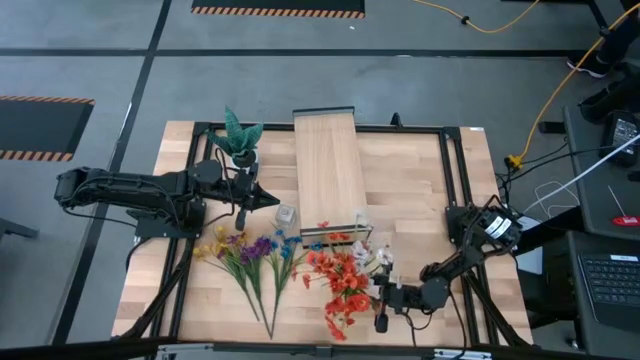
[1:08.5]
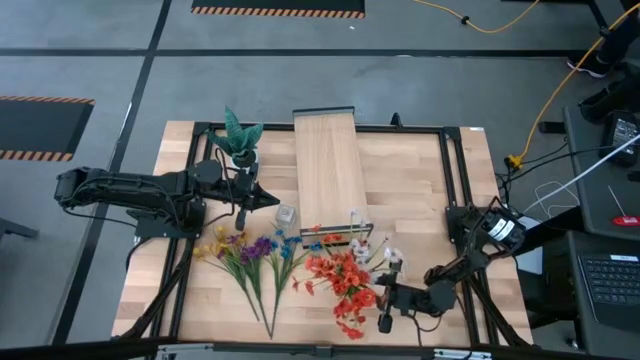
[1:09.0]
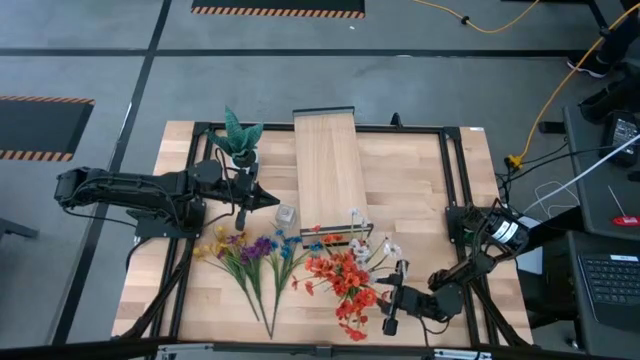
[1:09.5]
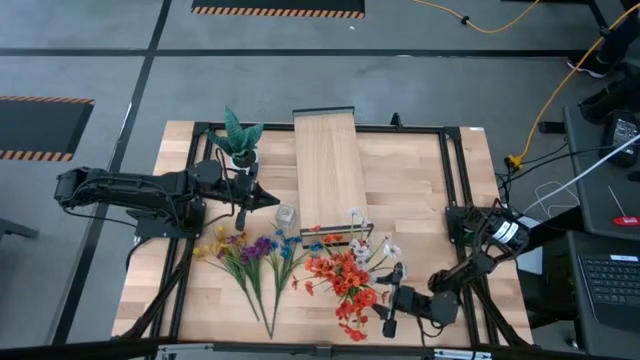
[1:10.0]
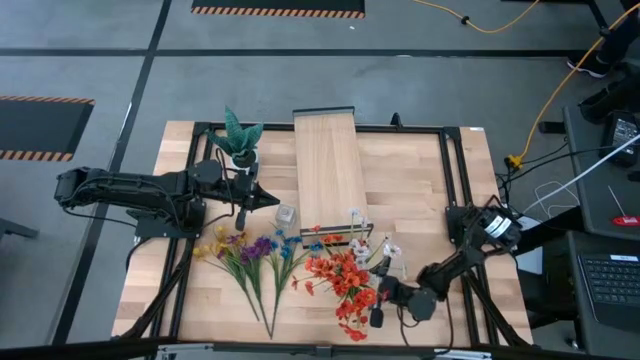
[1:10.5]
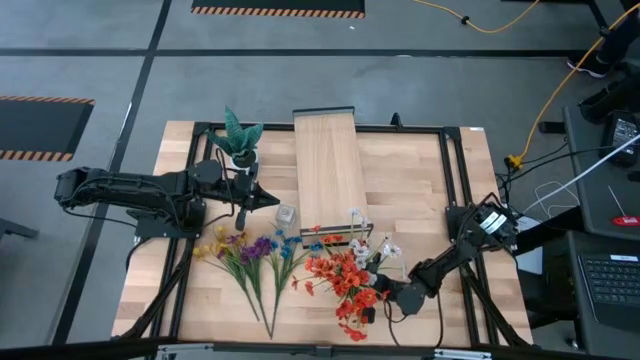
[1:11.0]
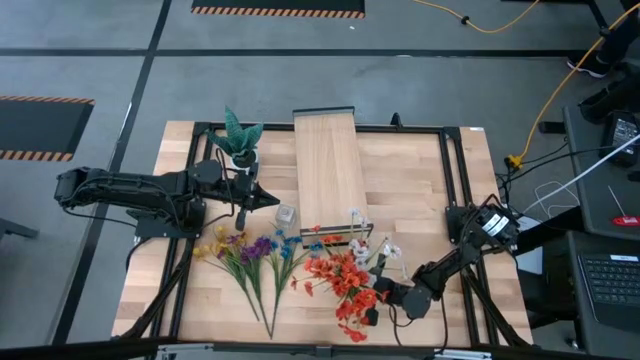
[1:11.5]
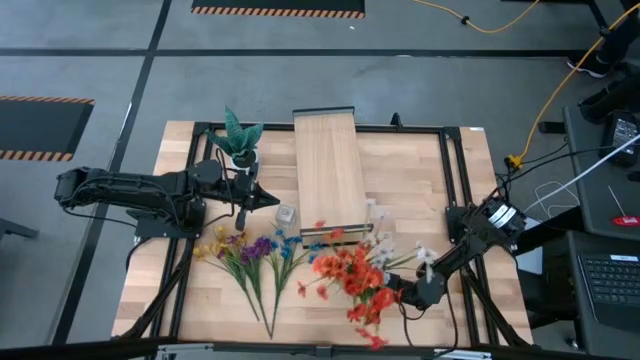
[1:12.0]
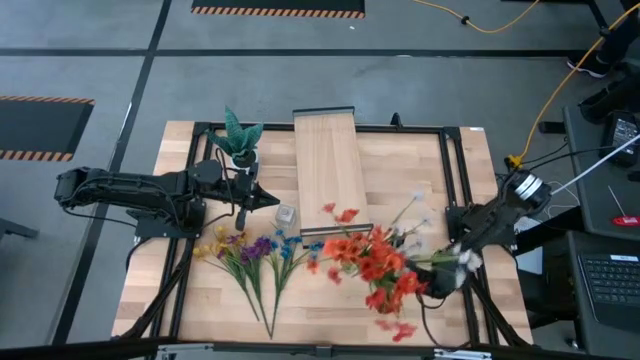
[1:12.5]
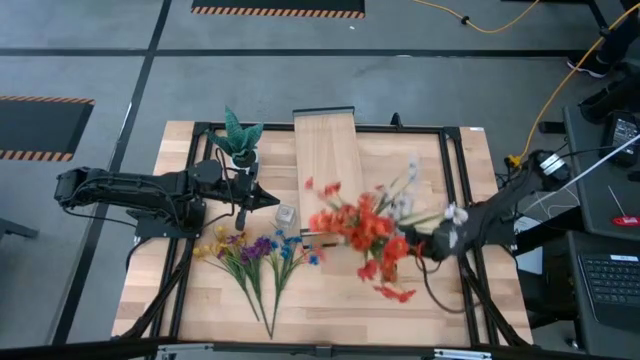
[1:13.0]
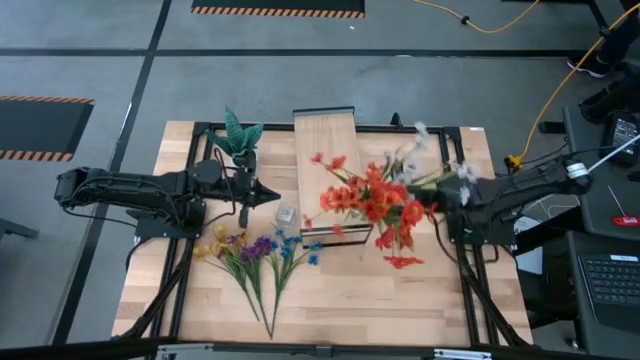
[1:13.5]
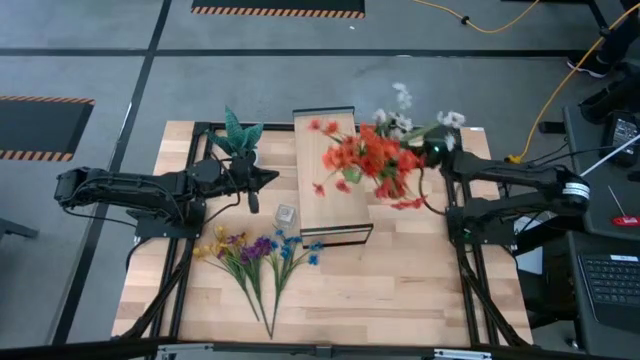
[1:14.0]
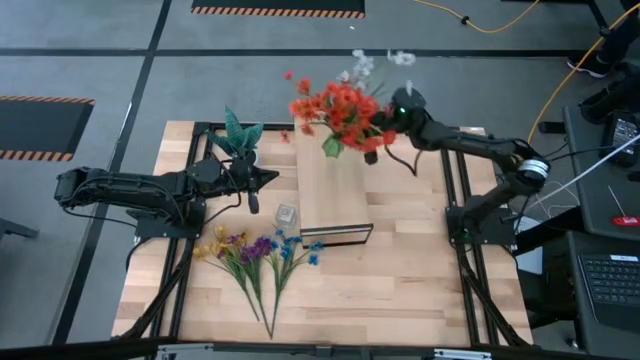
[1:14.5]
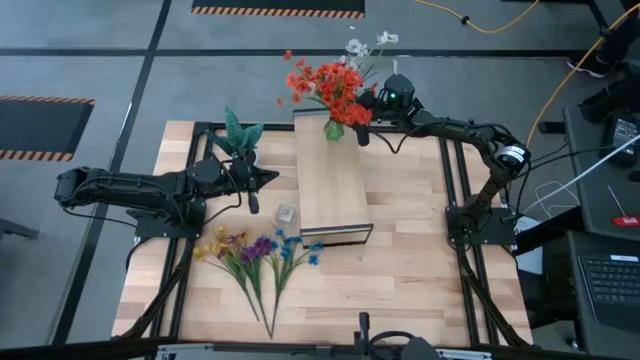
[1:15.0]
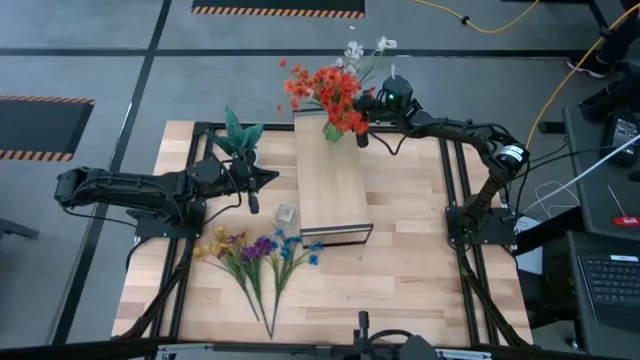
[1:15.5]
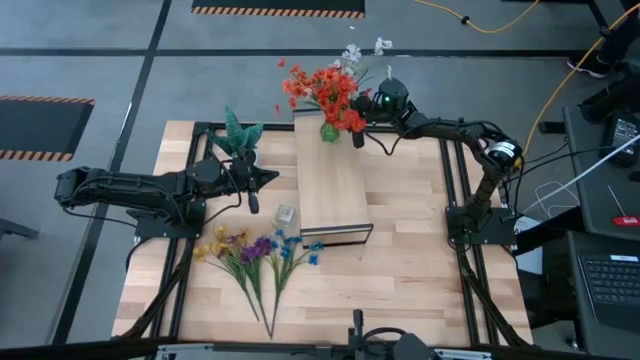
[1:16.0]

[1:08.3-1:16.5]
Task: Pick and place flowers into a vace then onto a shelf
Put the green vase with flowers on the shelf

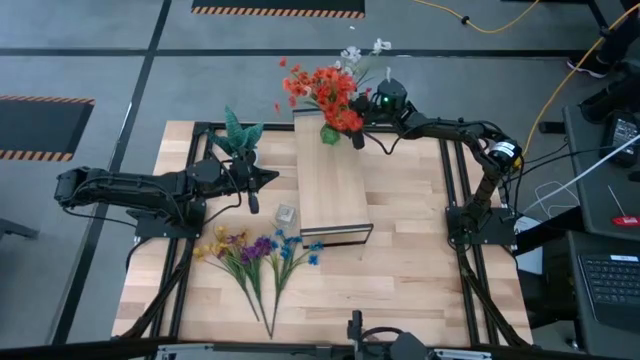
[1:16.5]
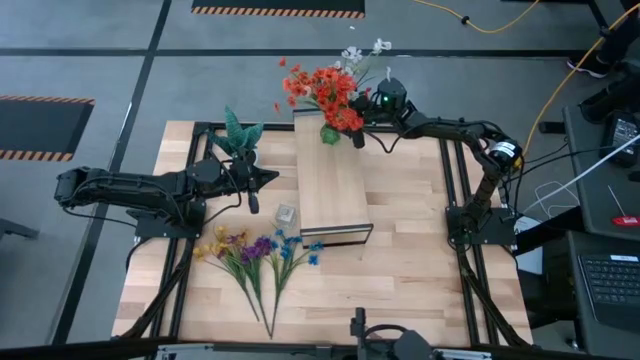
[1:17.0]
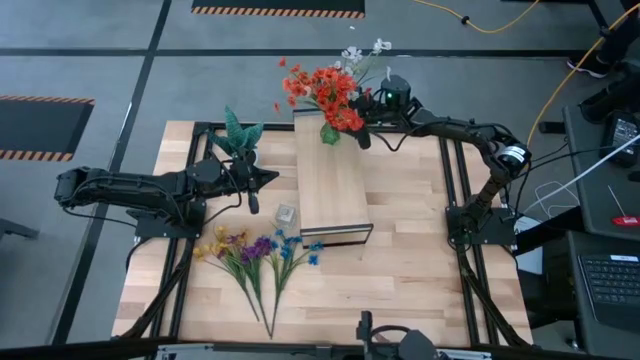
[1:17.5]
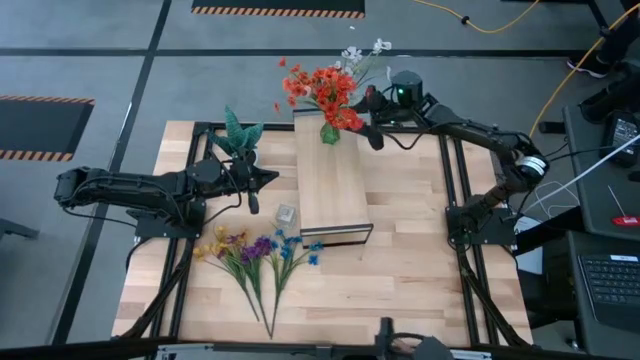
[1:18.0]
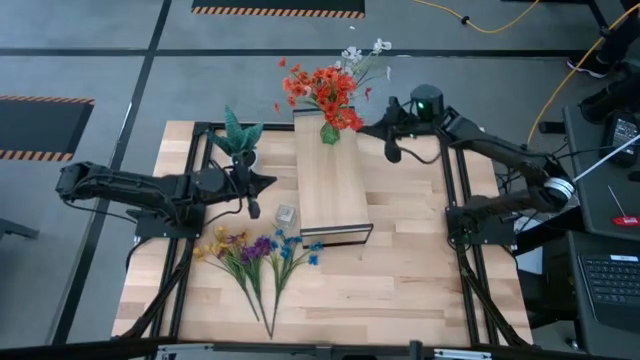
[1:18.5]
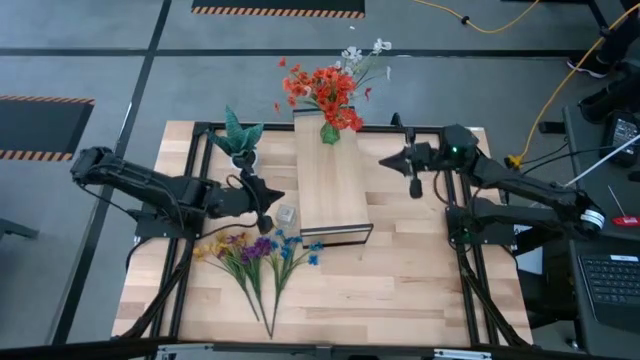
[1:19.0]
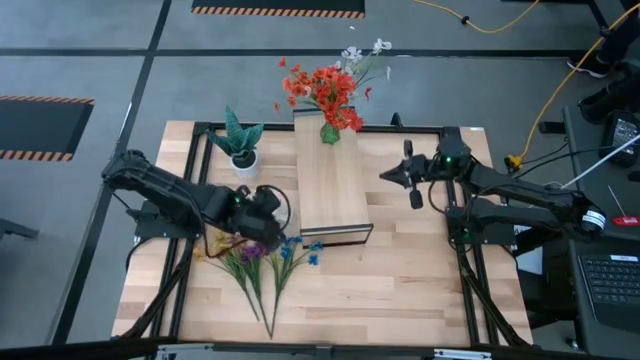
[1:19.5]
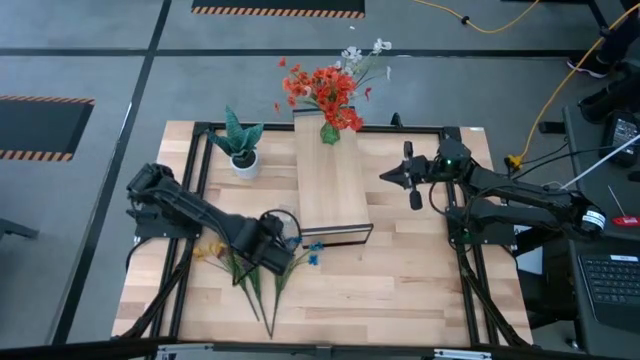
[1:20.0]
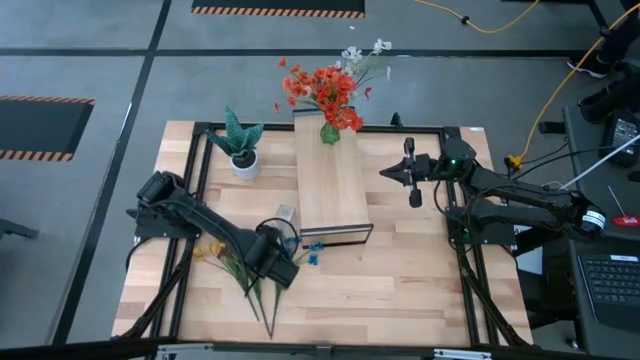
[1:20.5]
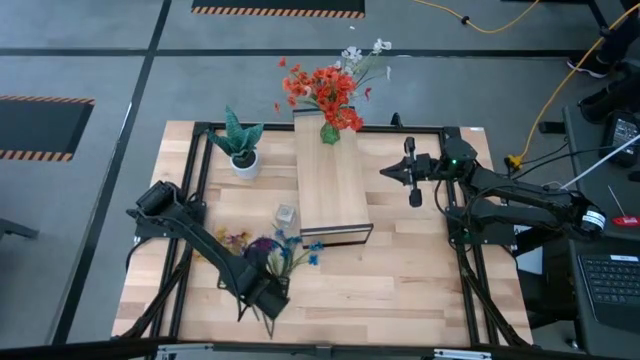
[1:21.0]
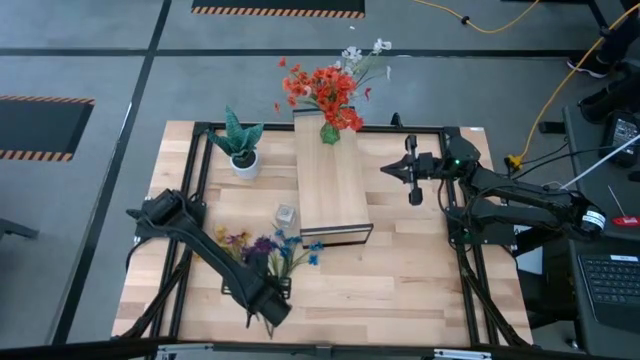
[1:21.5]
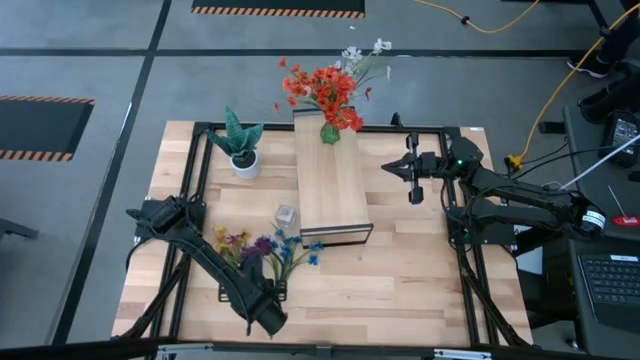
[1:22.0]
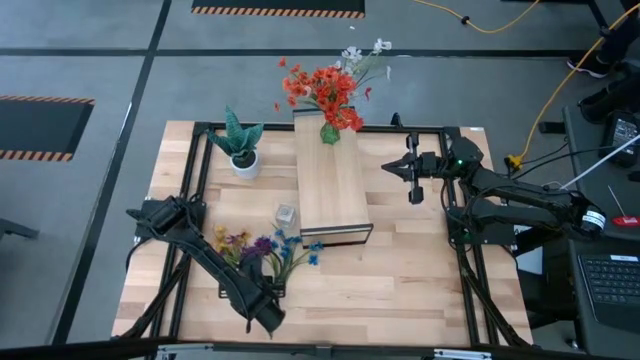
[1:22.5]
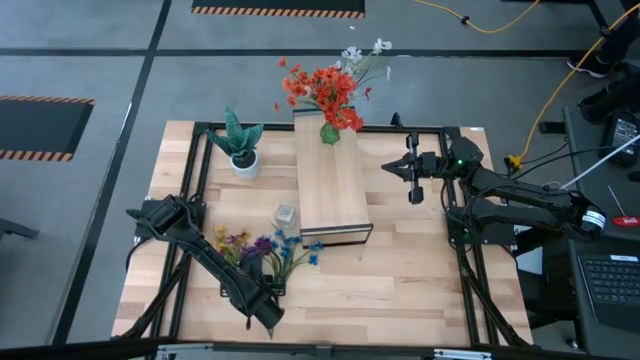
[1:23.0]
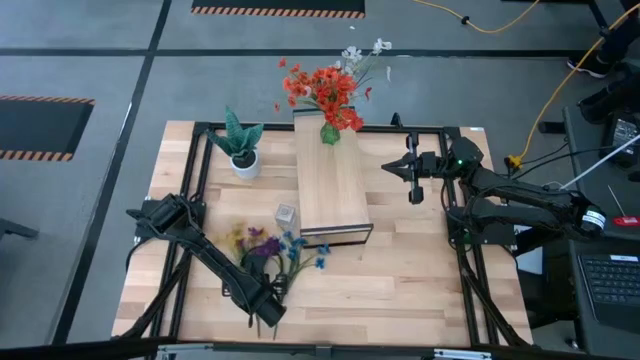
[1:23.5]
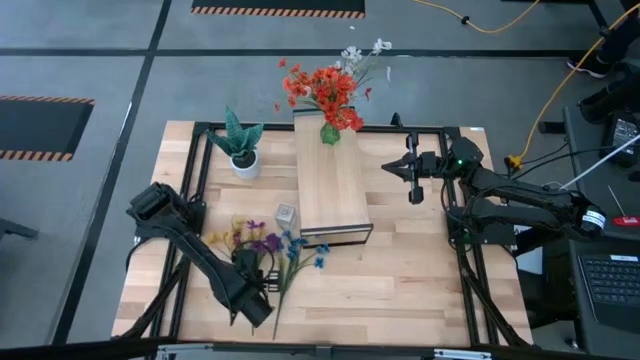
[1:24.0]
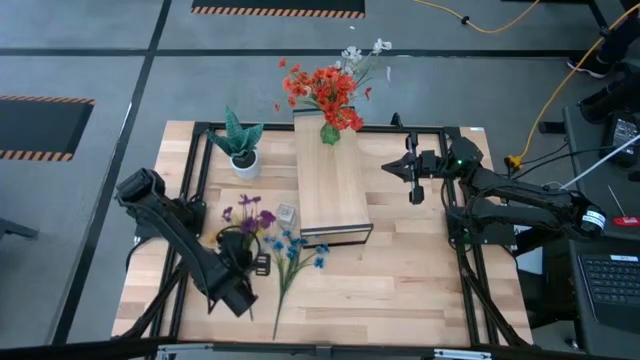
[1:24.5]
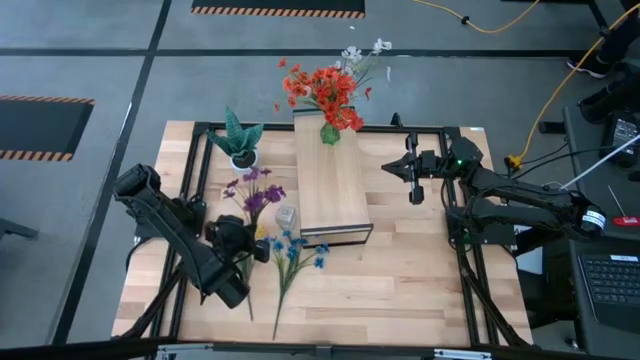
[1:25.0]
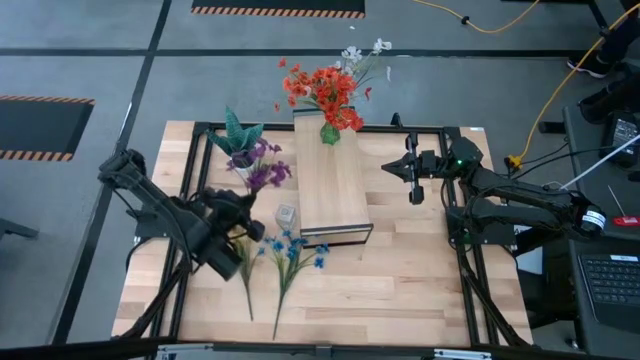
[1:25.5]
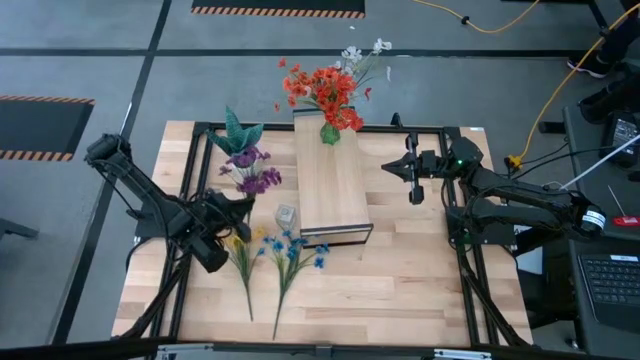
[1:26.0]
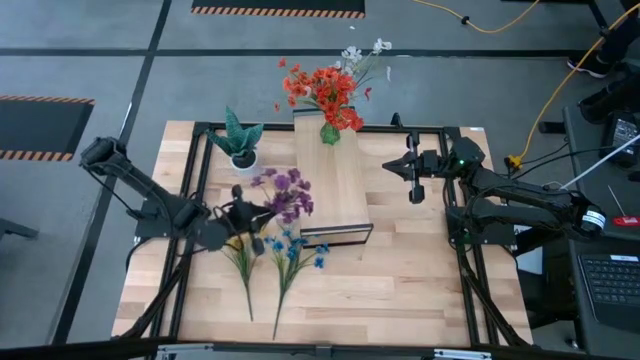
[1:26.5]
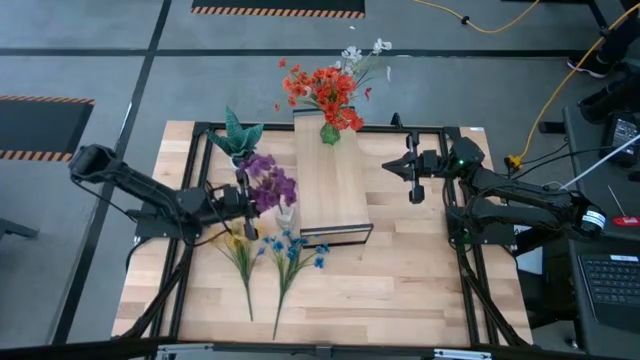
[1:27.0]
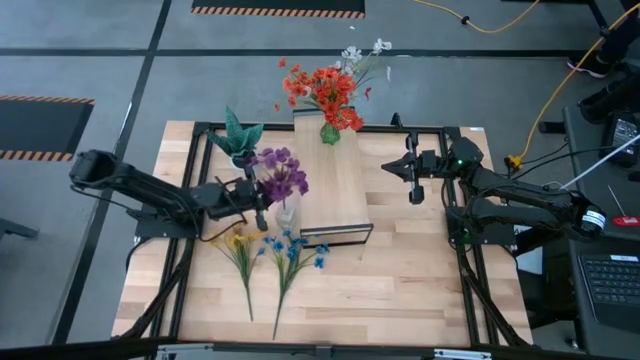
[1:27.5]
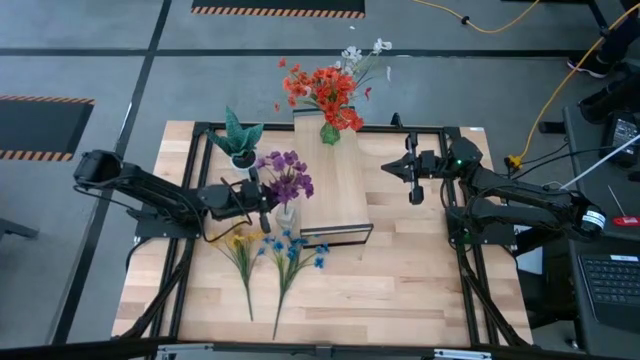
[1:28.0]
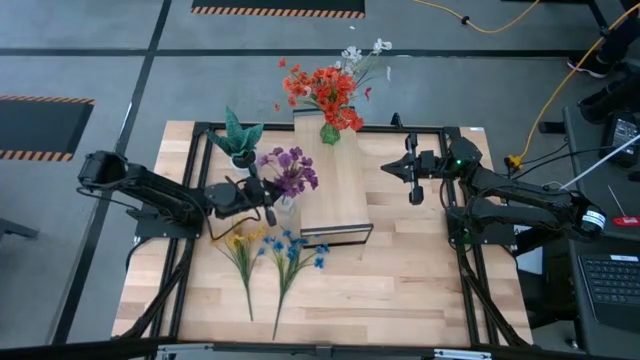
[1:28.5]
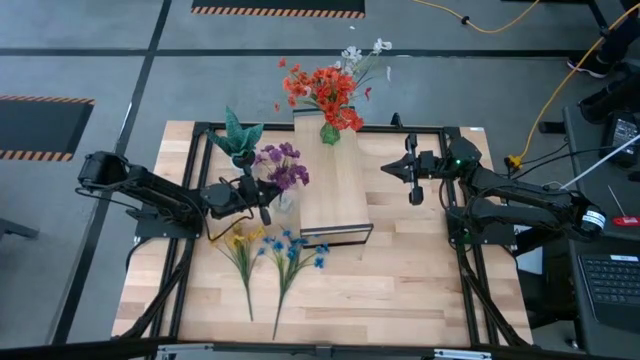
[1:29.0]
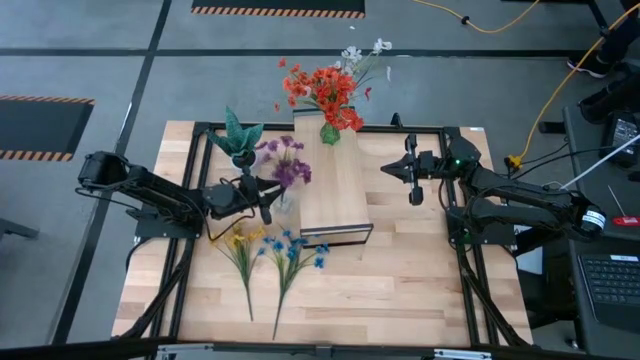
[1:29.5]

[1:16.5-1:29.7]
Put the violet flowers into the transparent vase
